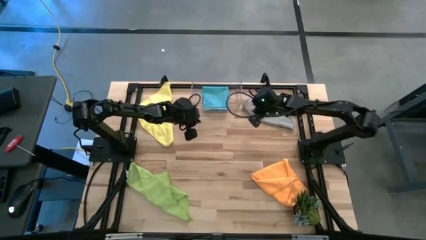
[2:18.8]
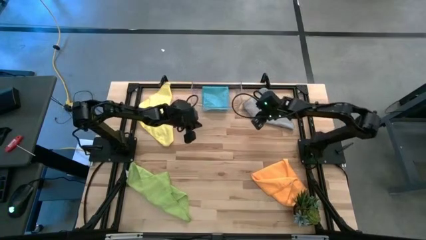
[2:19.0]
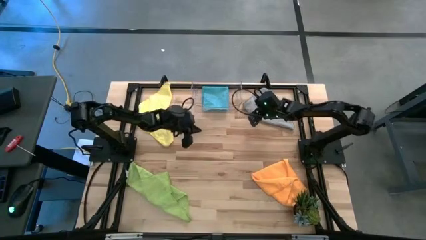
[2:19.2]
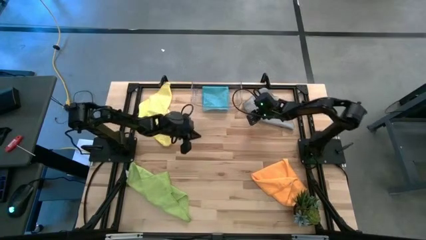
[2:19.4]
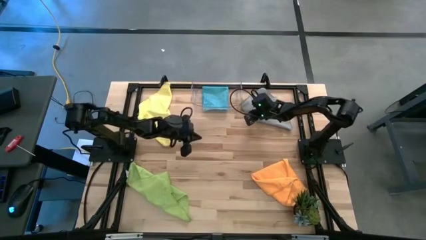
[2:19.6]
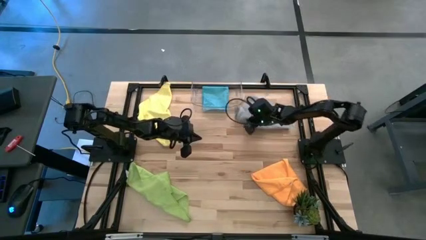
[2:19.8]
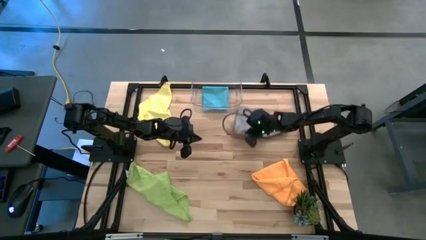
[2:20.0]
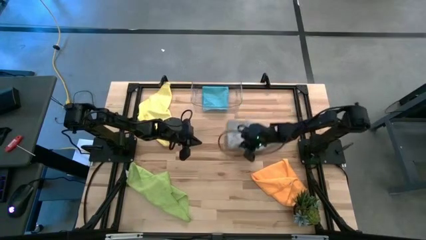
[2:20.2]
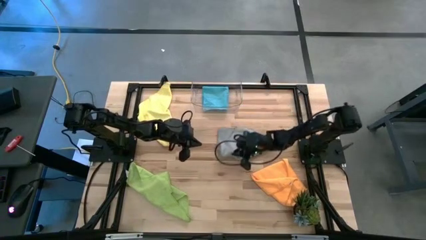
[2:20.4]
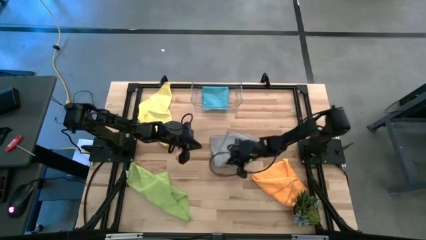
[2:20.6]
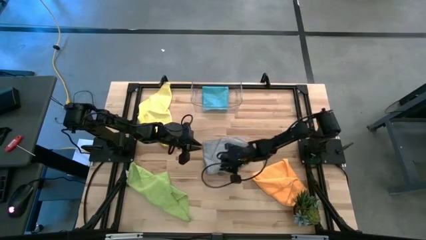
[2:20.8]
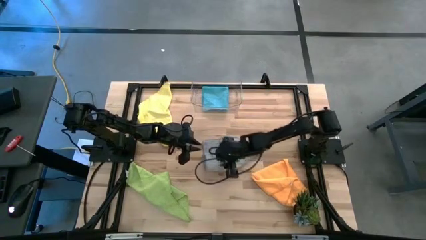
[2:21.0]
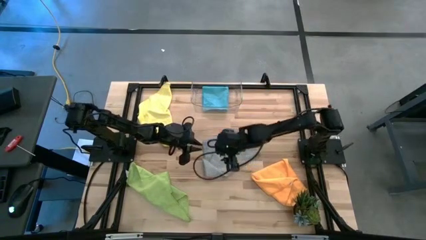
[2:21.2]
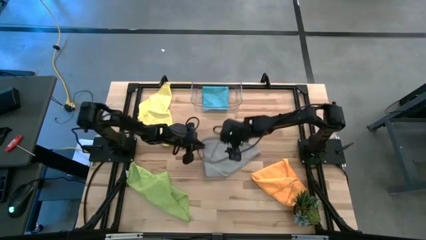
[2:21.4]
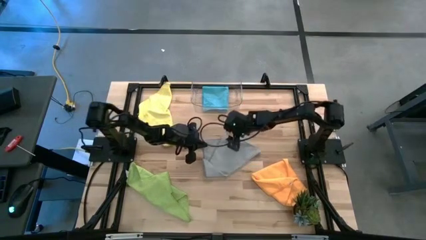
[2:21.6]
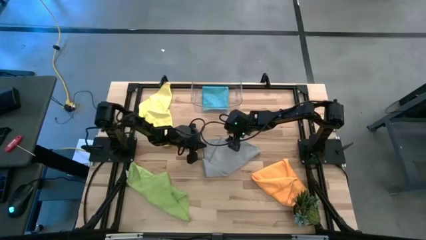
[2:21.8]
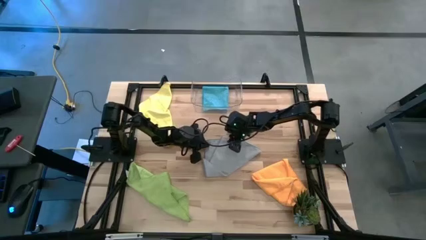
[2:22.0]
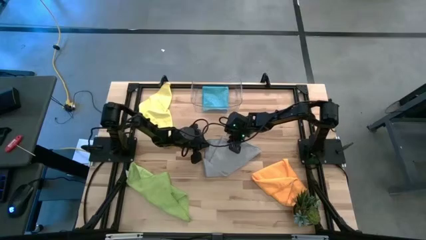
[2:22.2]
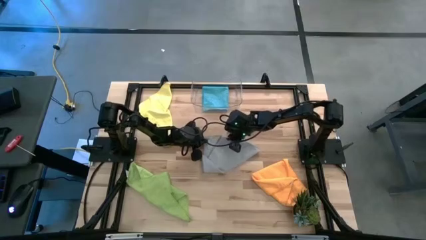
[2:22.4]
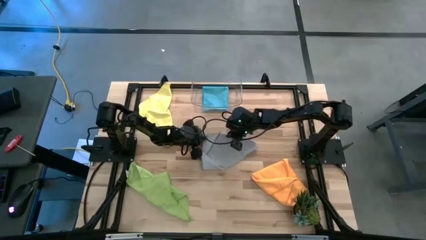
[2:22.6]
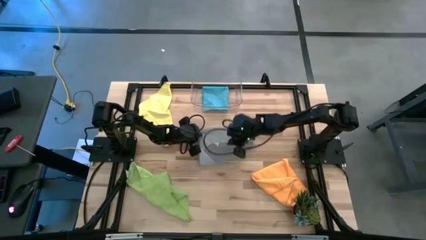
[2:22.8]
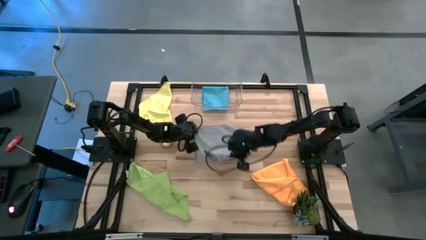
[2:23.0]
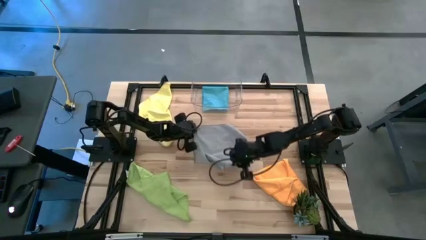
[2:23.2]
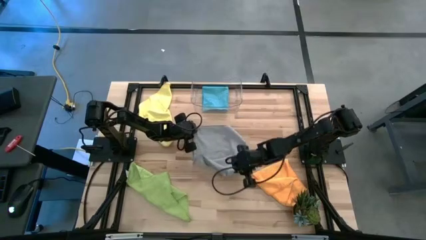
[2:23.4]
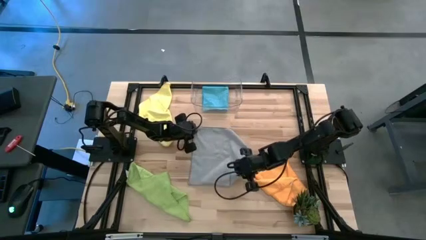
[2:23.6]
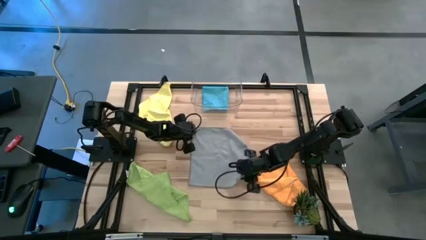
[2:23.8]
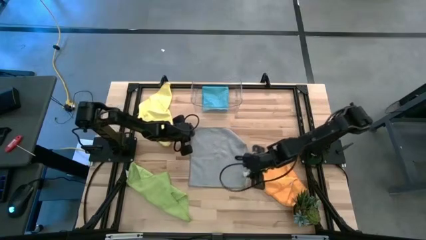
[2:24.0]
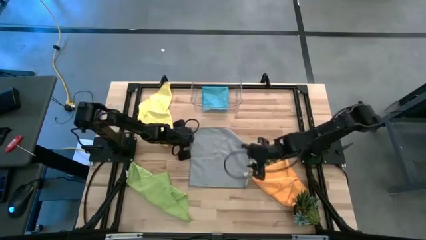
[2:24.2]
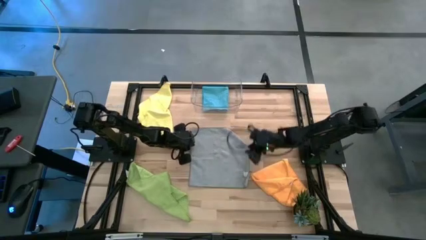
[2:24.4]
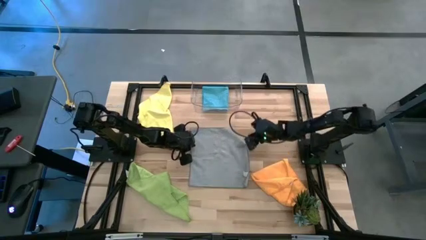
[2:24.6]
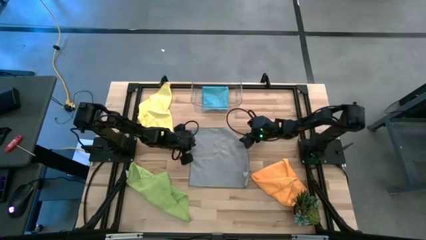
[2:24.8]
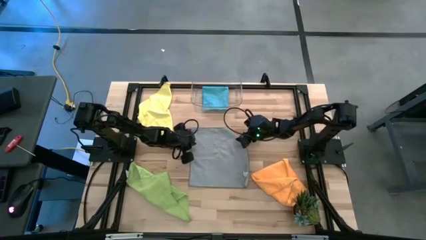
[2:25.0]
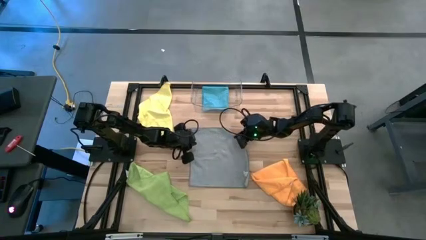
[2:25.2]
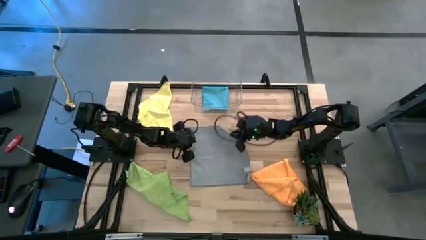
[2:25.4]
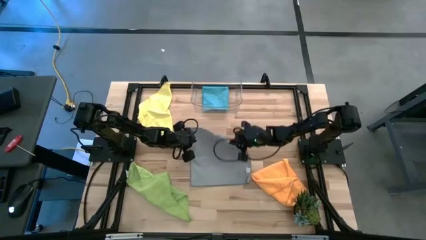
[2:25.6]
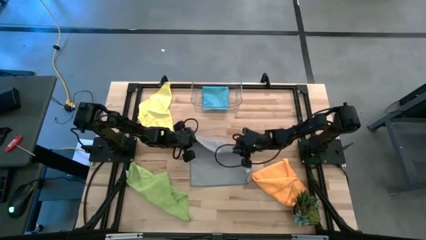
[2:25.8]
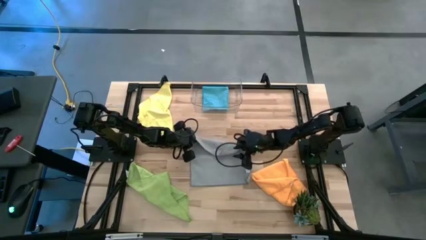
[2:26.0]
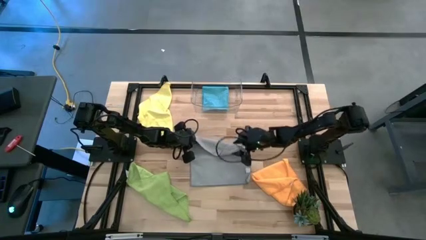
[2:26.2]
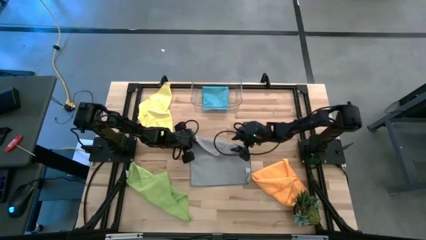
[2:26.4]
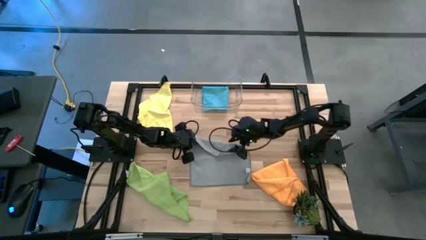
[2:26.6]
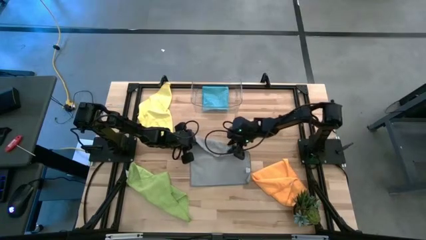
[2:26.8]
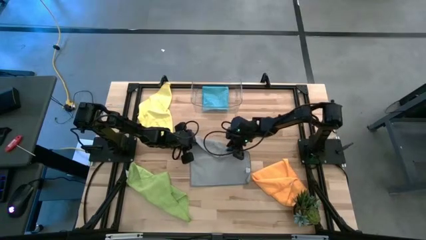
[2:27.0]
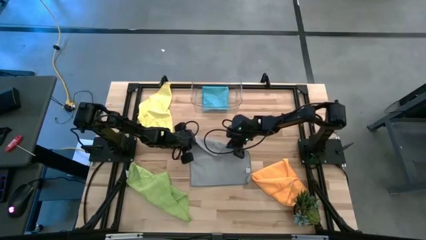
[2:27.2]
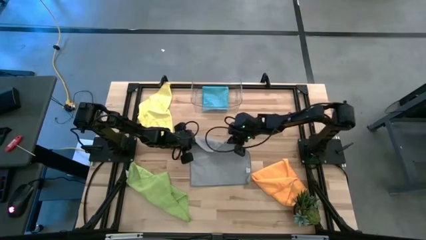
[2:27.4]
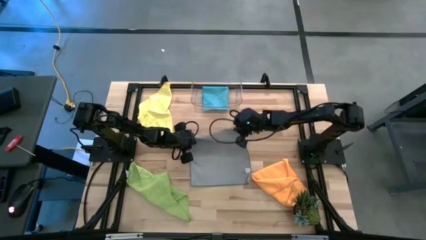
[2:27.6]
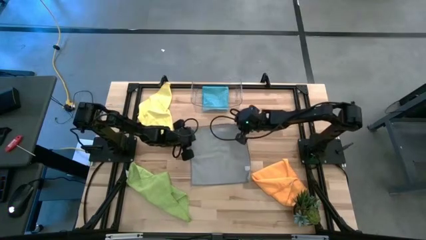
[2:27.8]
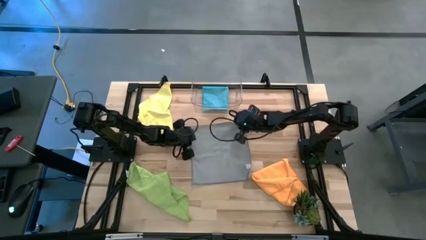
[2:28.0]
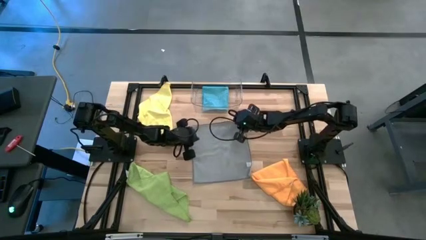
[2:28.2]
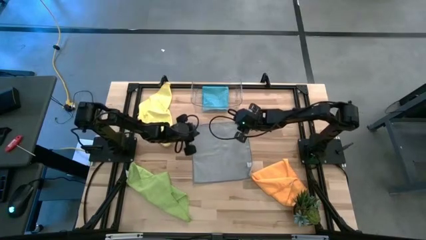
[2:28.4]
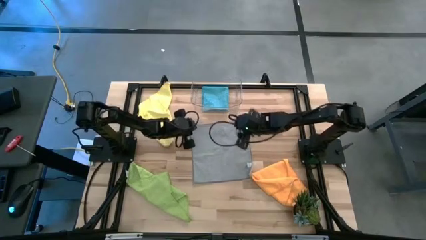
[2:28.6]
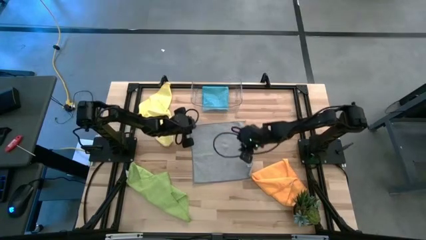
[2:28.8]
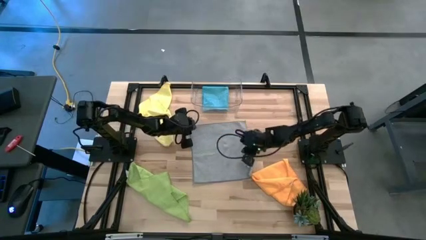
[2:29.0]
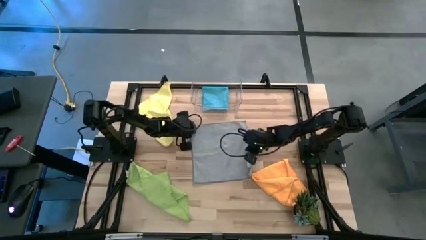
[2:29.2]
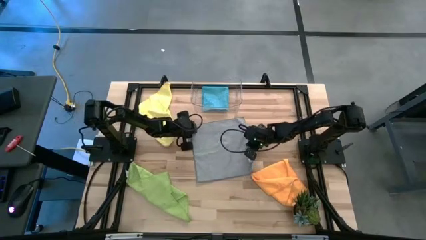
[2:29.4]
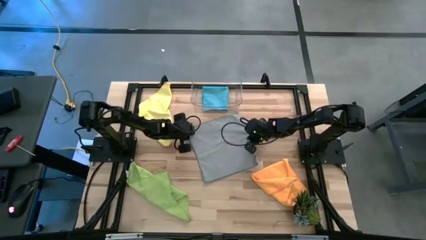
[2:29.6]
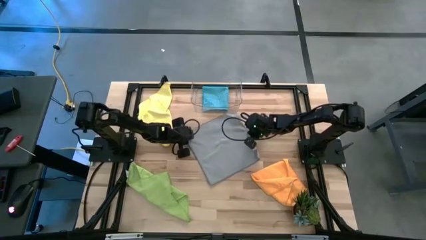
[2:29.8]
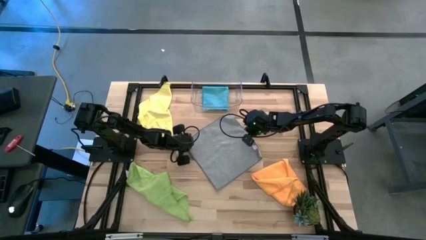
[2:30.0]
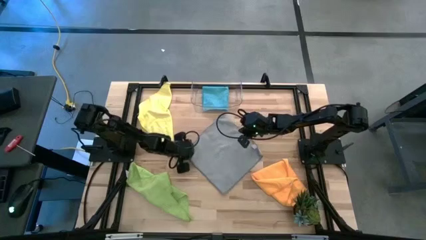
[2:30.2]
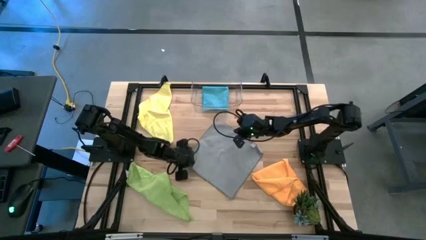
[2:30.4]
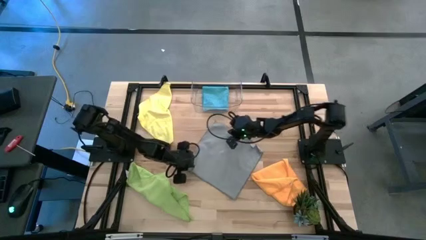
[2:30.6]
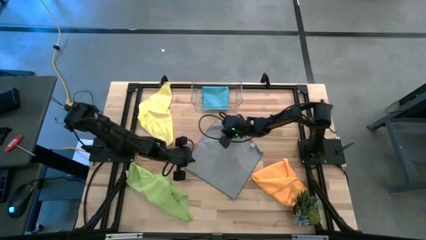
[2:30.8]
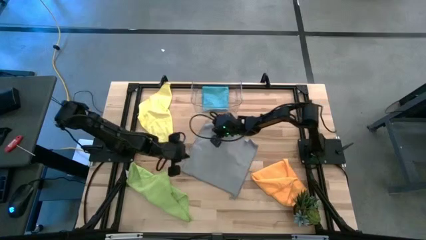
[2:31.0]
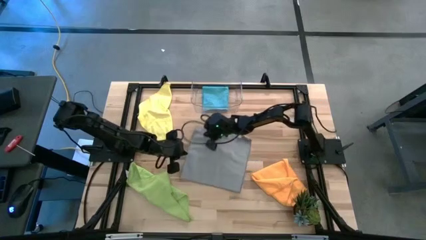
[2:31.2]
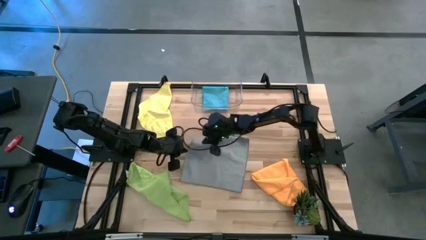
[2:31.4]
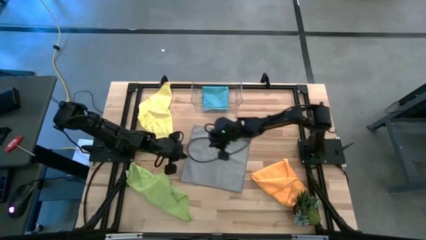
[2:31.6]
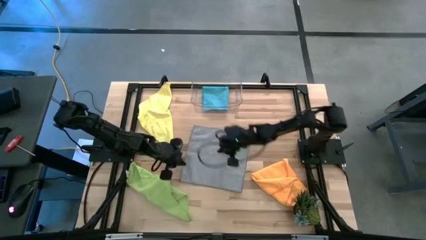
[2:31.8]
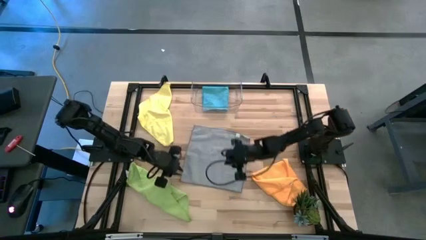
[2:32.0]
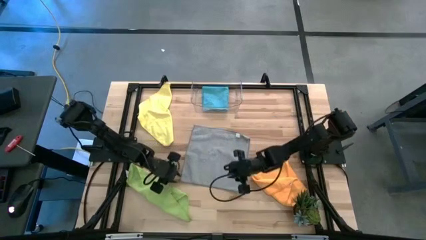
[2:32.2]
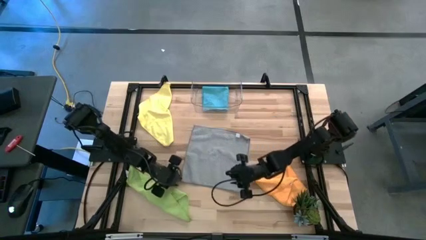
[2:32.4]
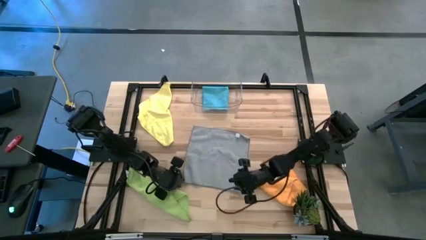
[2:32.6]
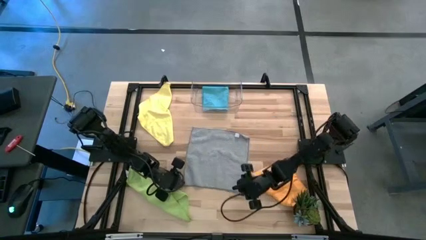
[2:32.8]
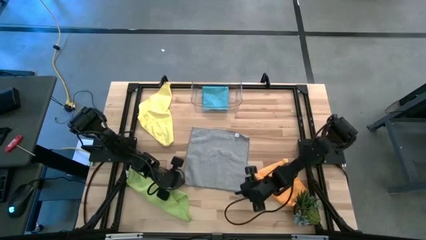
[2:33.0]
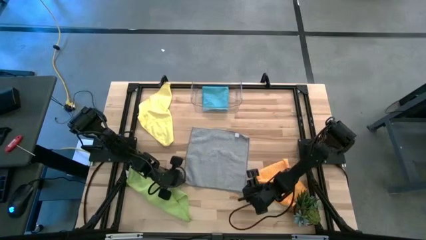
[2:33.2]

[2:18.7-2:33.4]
Task: Fold microfiber towels
Fold the gray towel
